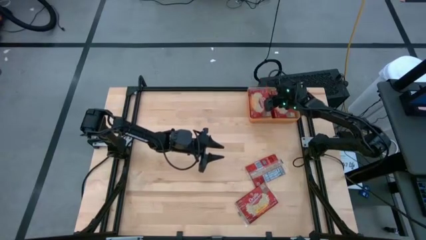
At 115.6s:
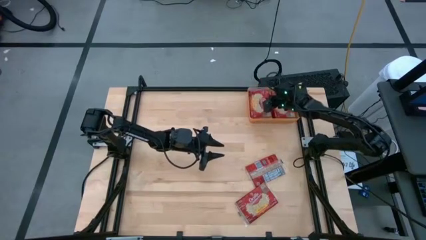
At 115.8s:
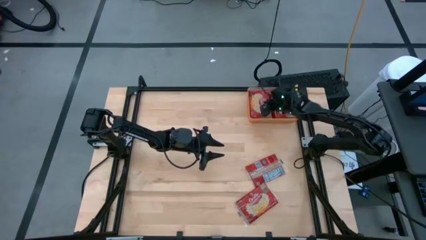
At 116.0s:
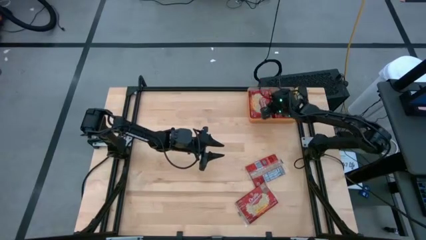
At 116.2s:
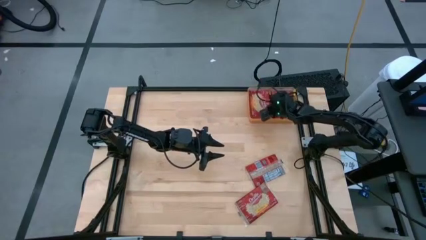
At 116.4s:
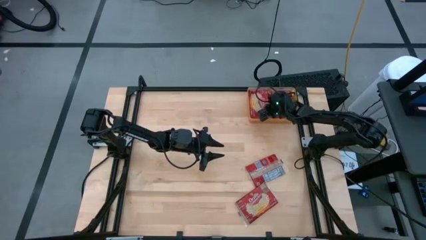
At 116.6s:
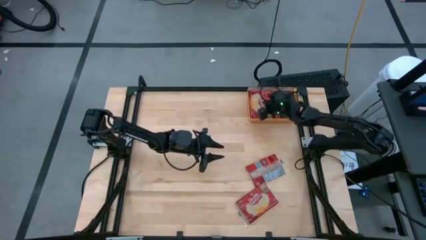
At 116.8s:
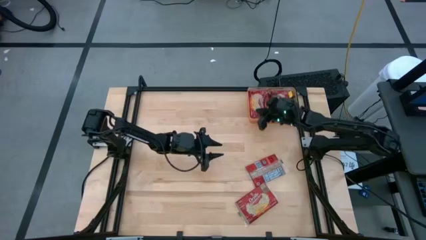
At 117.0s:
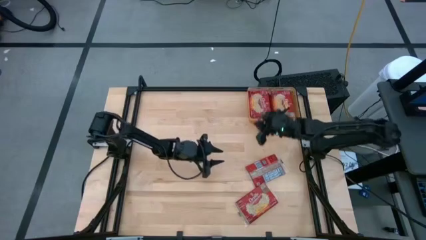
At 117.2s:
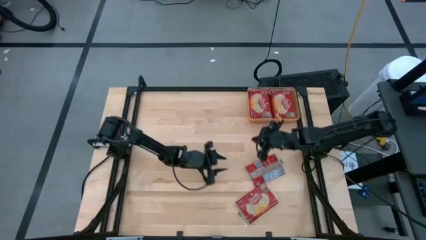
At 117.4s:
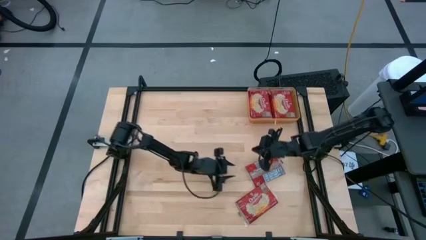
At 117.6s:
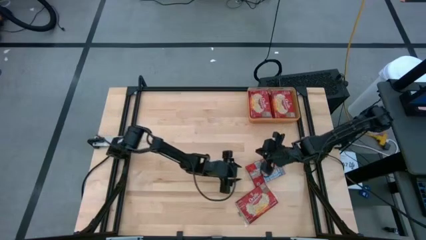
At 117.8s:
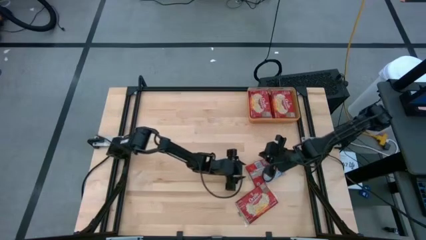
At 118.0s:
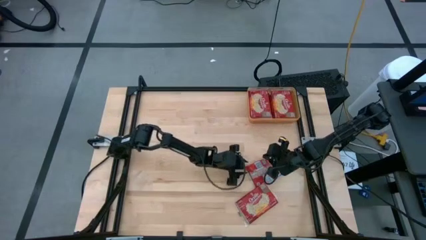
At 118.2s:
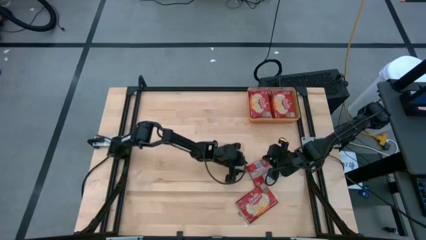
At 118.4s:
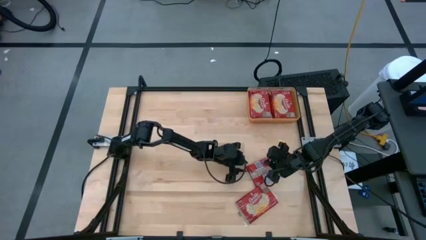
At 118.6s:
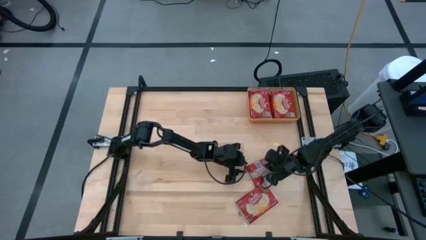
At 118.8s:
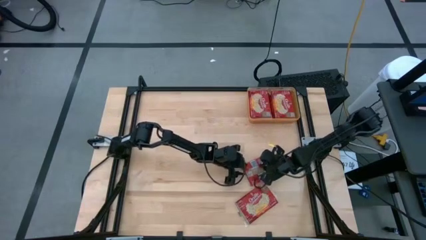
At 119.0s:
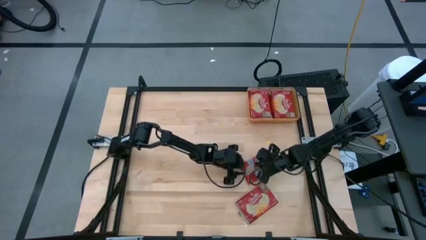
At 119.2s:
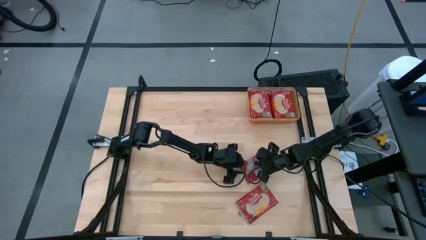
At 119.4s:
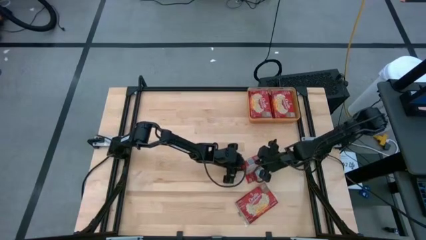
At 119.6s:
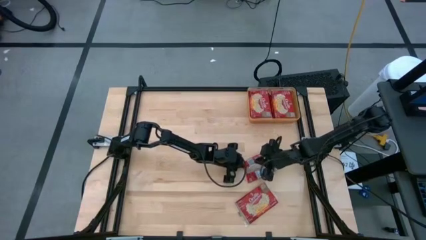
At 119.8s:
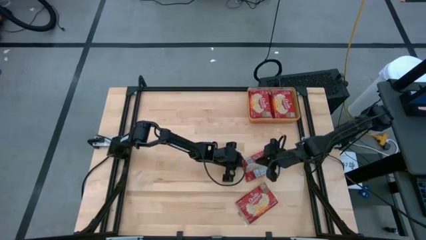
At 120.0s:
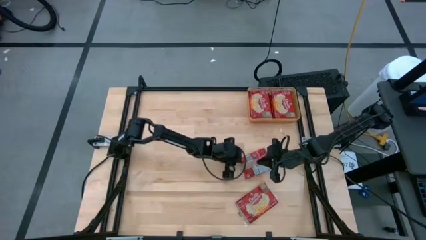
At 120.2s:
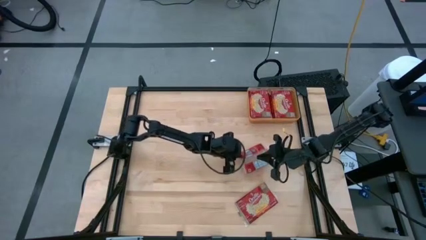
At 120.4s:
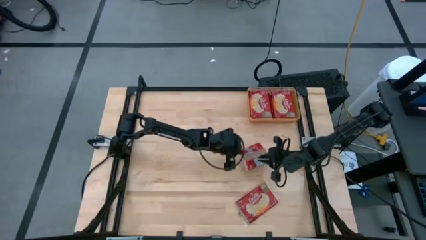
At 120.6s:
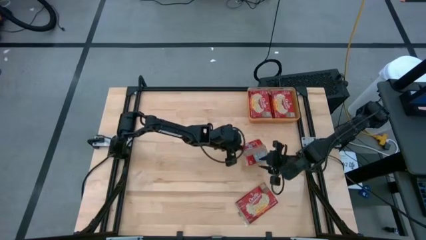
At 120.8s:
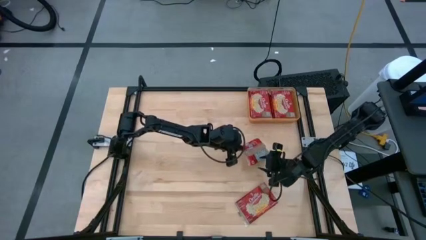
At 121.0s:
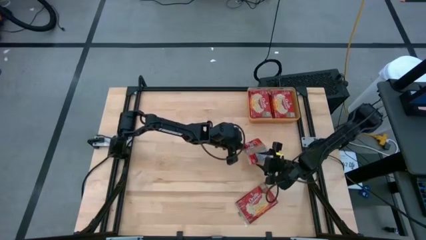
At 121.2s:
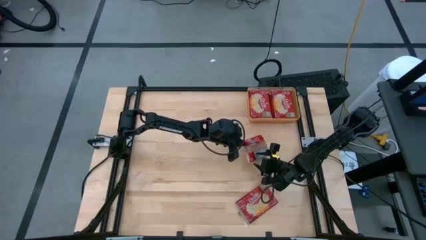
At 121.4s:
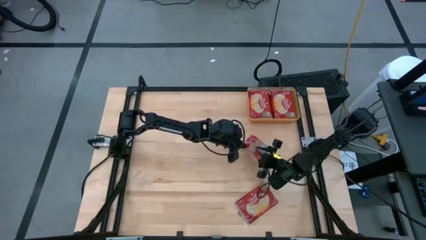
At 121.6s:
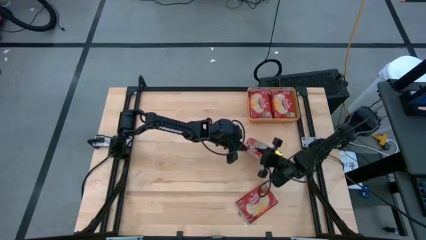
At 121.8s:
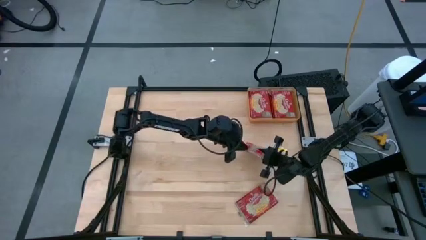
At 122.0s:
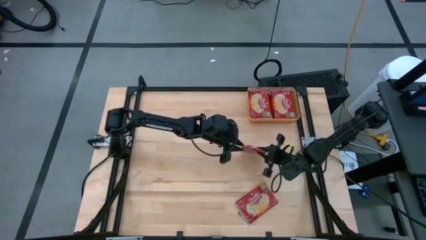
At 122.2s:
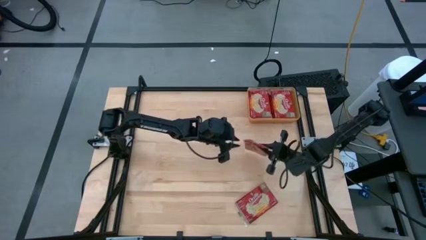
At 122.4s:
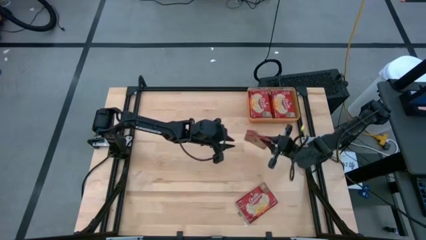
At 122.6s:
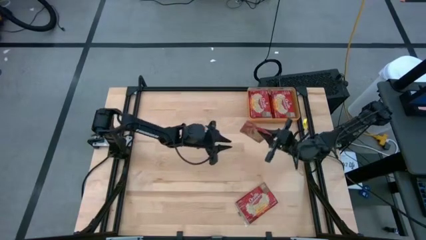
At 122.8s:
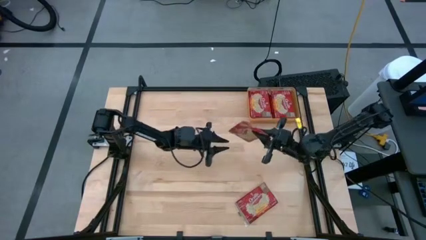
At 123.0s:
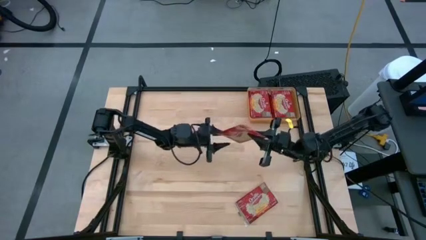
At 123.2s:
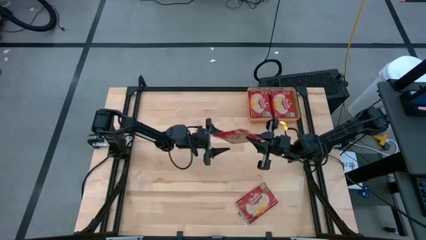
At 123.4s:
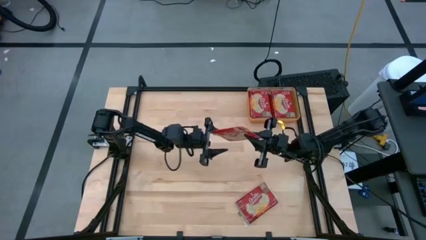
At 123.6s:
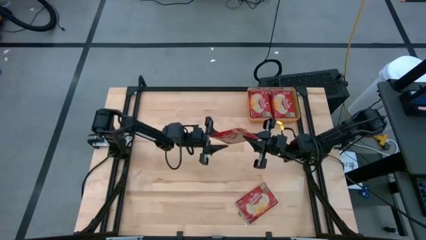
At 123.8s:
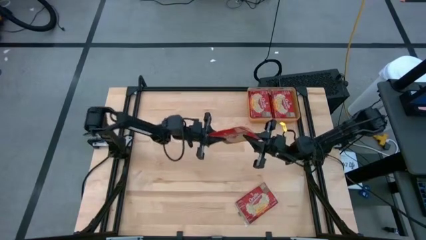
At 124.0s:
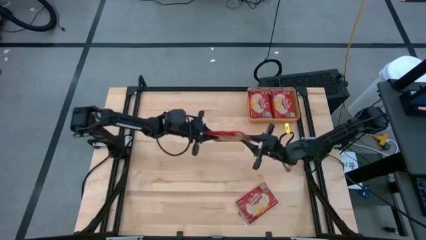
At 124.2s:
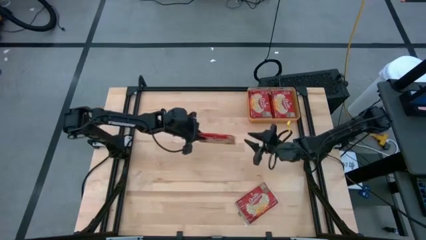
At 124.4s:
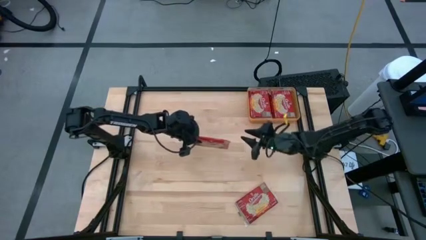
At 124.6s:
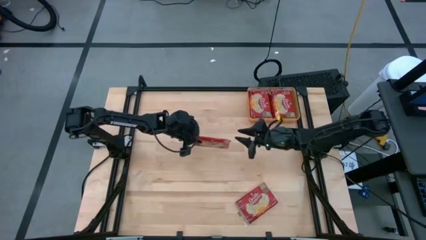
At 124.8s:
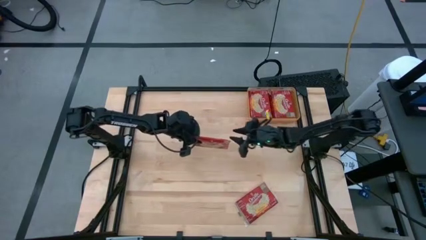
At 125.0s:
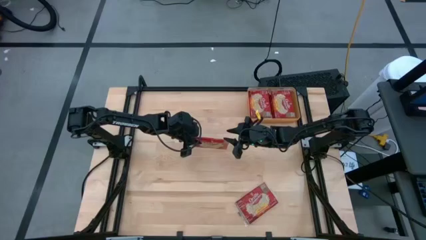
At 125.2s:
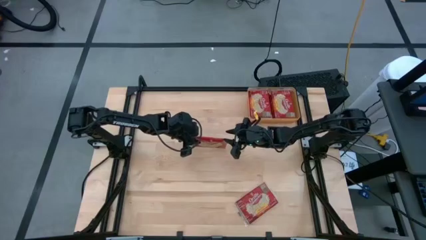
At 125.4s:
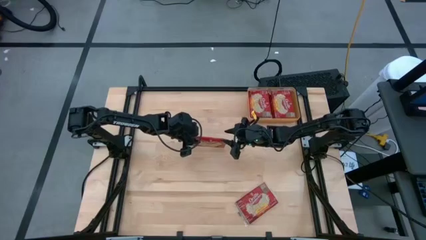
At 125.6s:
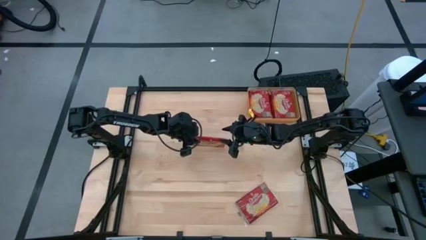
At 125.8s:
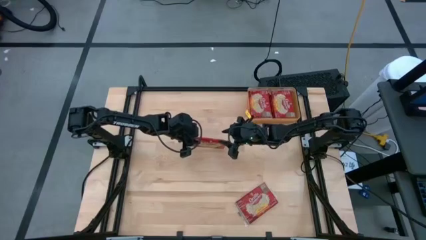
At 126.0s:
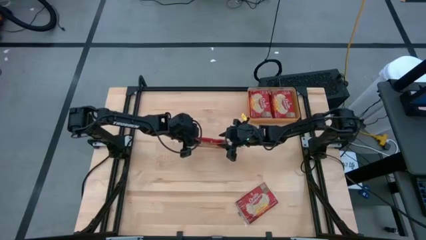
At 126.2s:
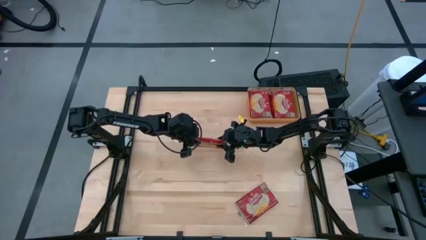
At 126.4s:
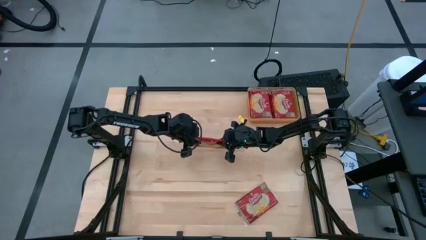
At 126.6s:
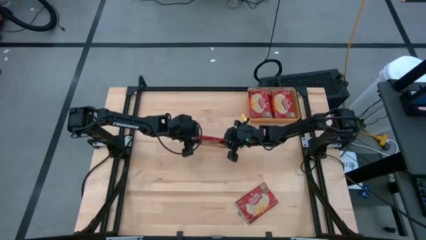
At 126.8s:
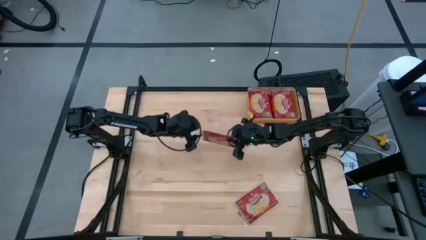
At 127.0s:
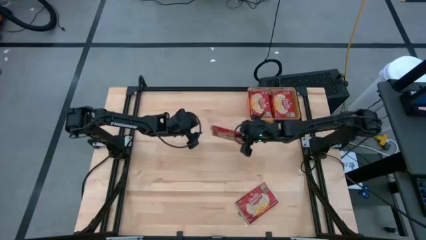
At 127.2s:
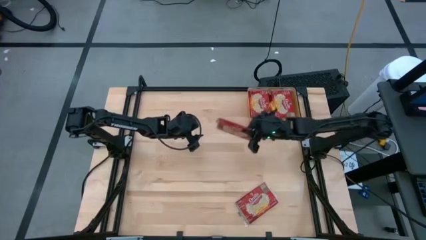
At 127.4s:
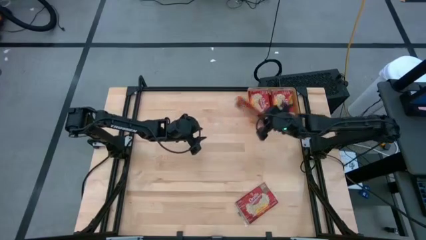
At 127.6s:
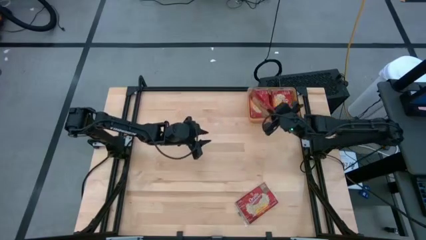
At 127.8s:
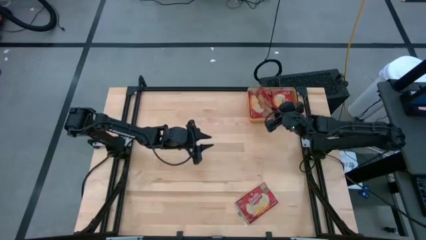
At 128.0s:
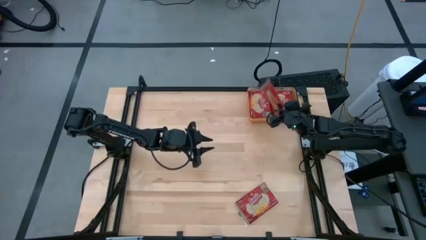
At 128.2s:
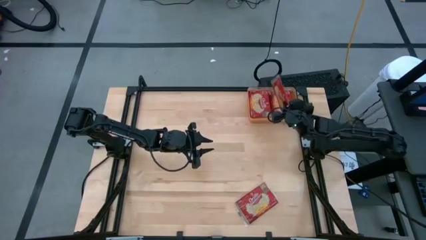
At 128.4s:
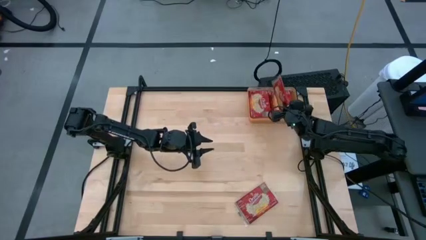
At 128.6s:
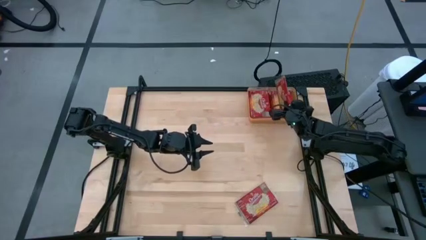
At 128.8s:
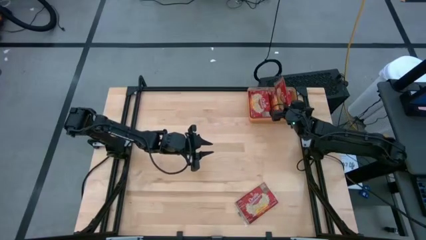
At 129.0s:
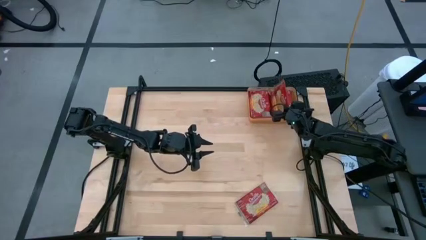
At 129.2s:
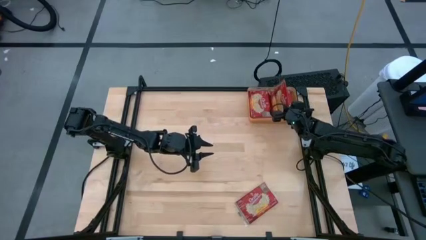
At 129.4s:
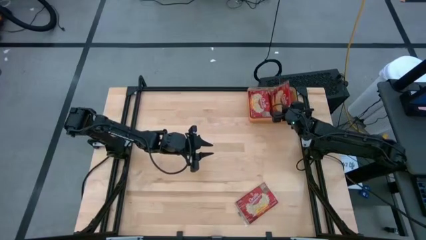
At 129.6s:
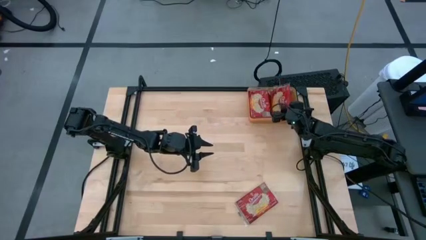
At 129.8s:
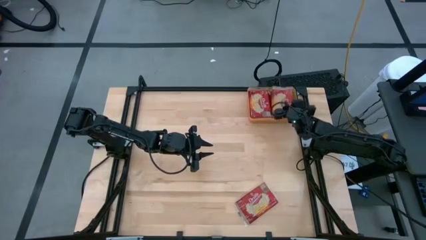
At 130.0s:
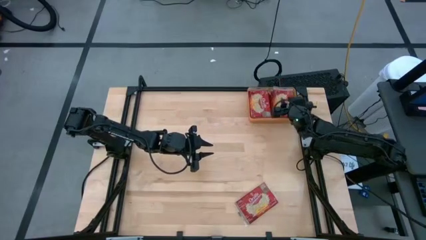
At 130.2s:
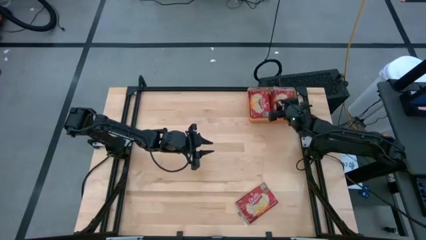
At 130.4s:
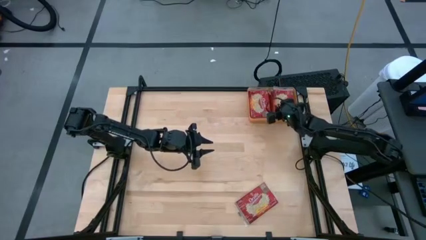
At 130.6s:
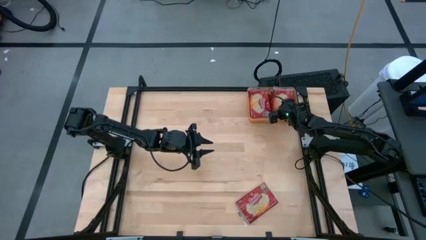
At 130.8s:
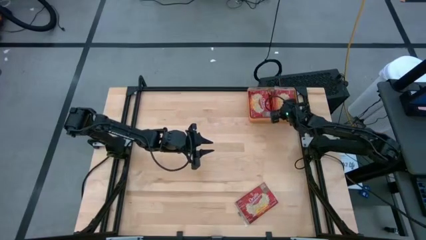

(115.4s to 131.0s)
Task: Sort popcorn bags into baskets
Put the red popcorn bag into the orange bin

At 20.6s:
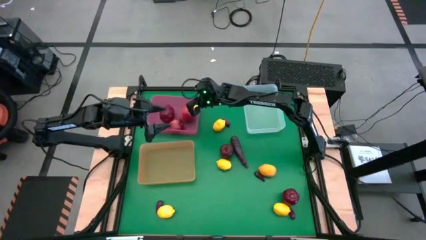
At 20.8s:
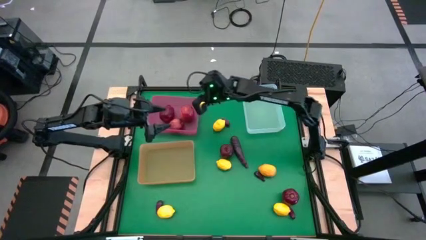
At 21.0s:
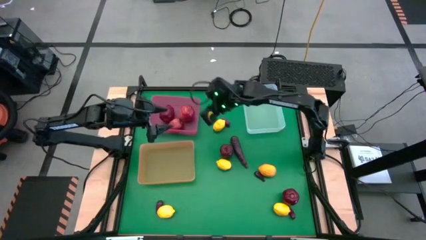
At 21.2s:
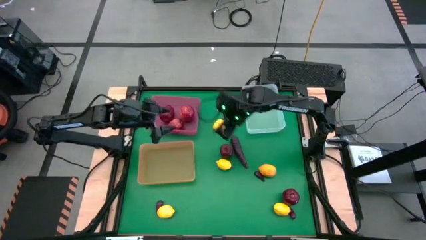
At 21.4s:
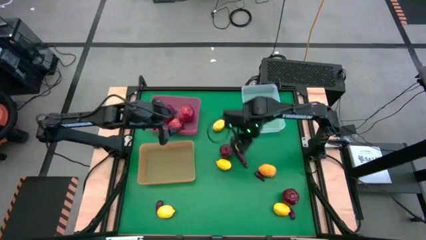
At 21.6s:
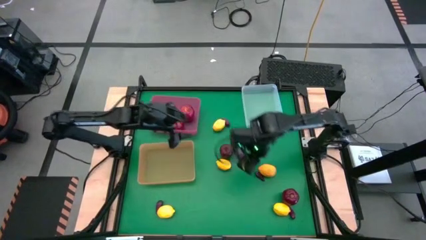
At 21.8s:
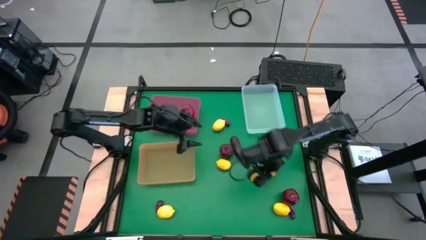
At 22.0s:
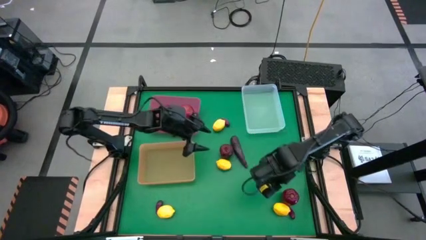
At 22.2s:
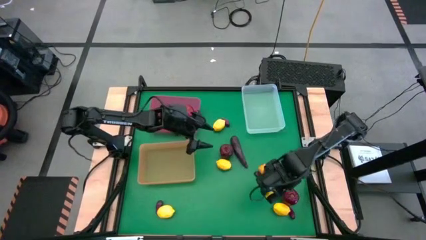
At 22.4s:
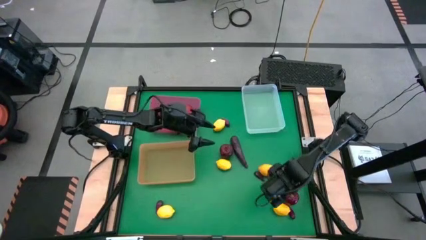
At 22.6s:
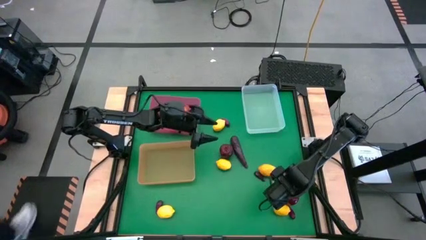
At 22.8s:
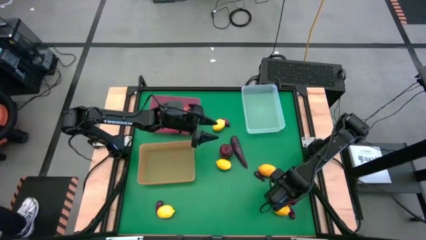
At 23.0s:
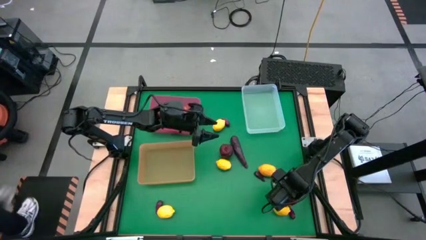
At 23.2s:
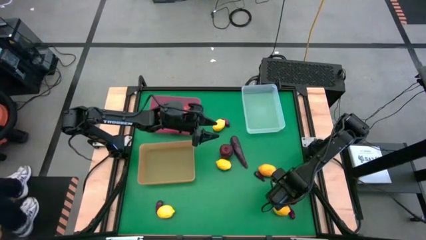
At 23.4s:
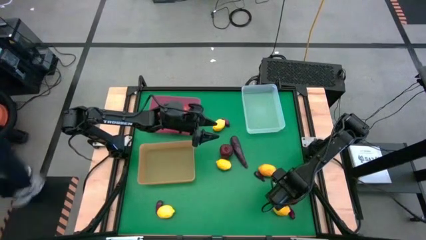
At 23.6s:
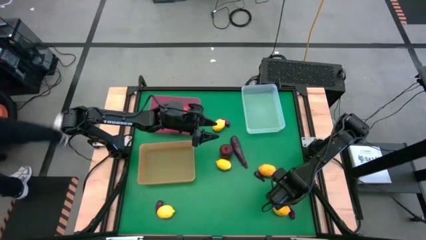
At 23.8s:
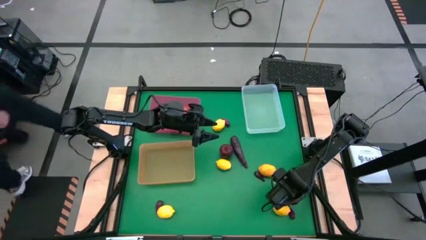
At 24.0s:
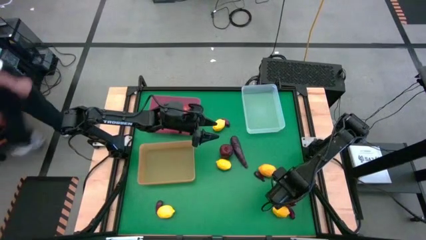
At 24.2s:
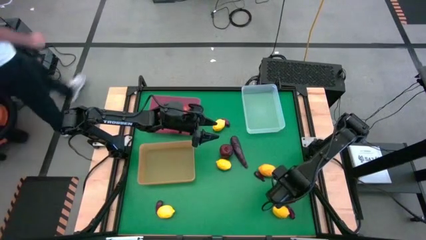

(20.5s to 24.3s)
Task: Sort produce into baskets
Put the apple into the pink bin
